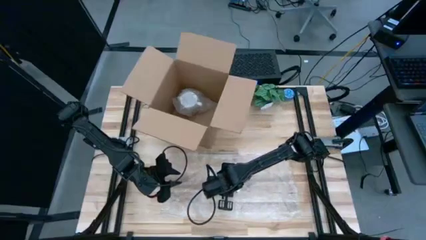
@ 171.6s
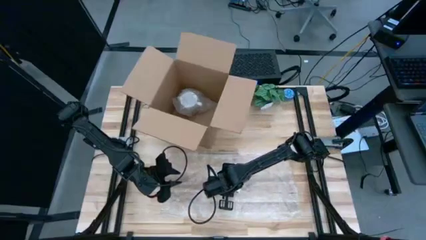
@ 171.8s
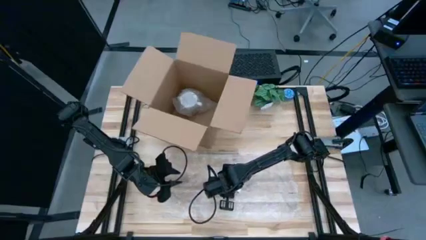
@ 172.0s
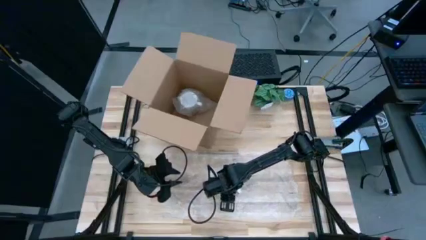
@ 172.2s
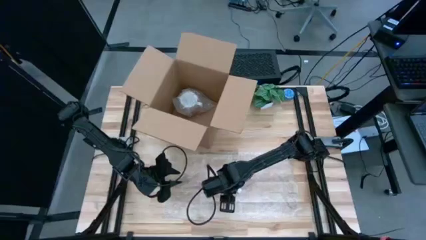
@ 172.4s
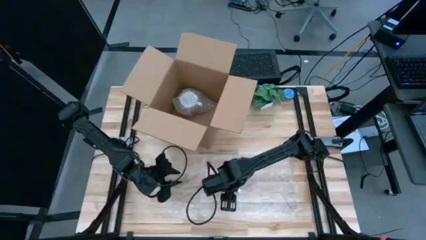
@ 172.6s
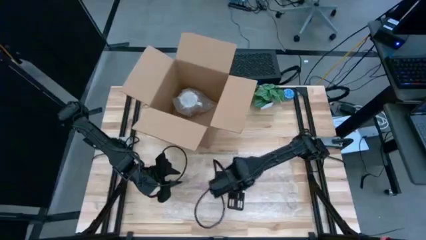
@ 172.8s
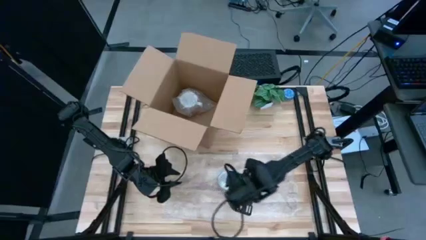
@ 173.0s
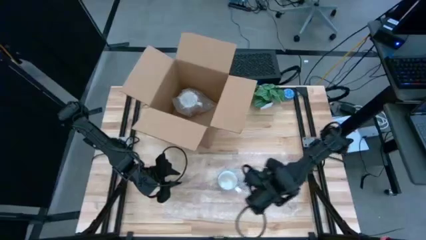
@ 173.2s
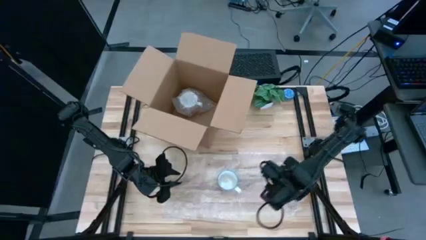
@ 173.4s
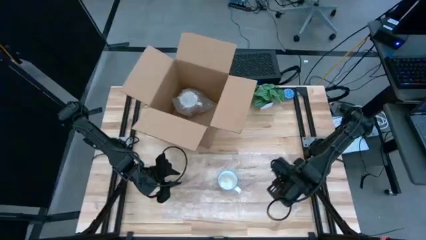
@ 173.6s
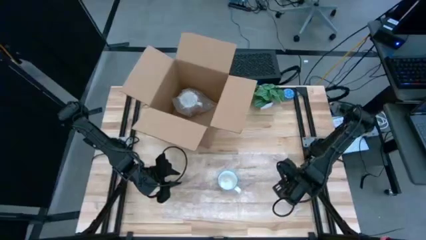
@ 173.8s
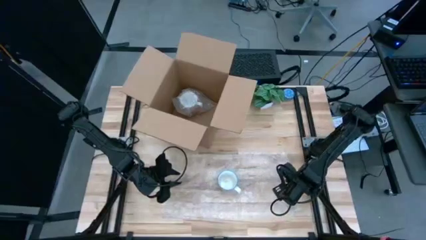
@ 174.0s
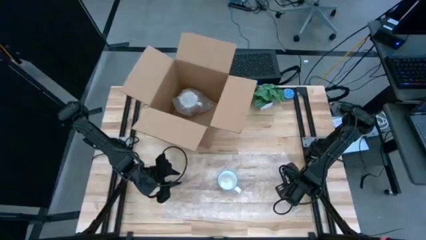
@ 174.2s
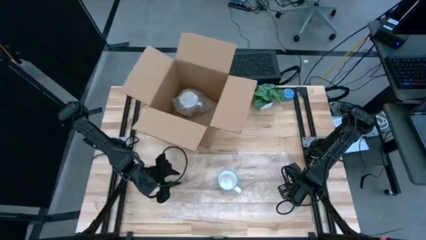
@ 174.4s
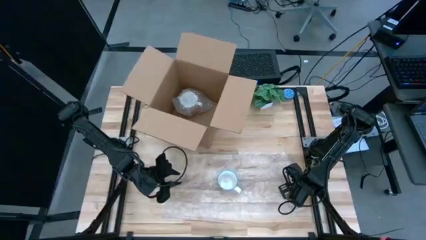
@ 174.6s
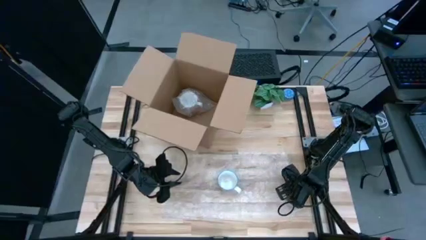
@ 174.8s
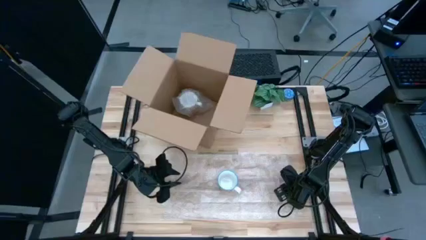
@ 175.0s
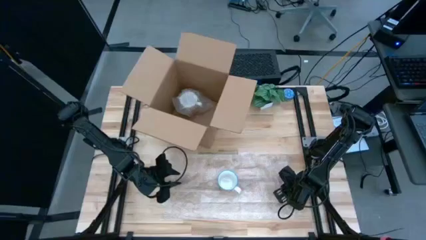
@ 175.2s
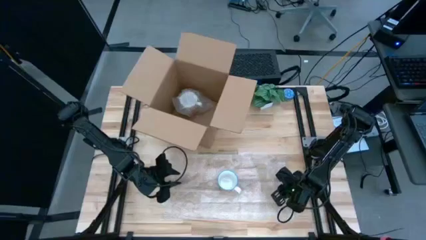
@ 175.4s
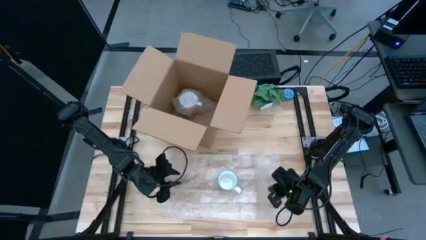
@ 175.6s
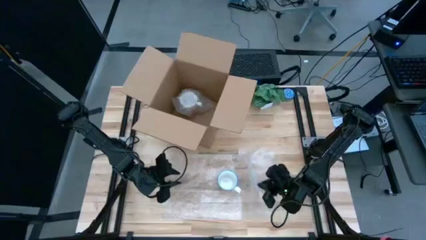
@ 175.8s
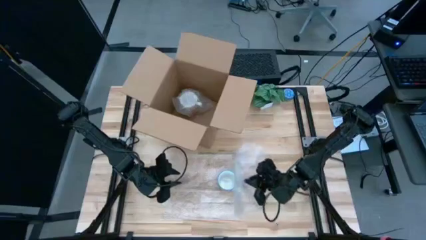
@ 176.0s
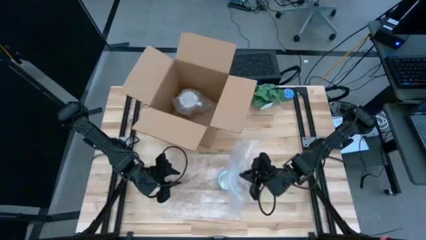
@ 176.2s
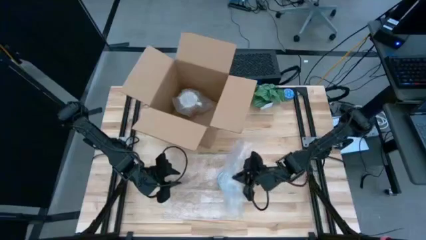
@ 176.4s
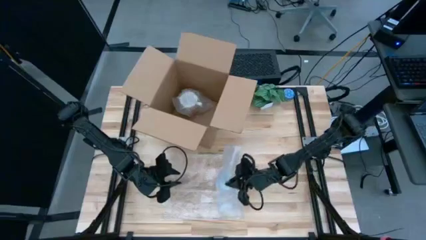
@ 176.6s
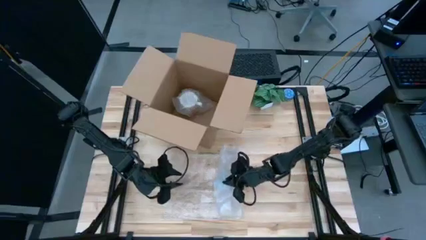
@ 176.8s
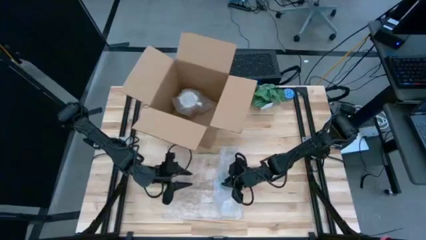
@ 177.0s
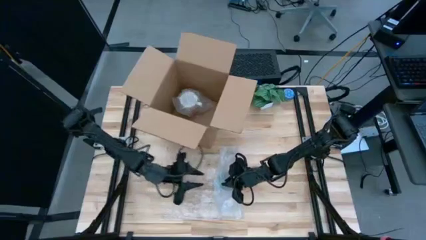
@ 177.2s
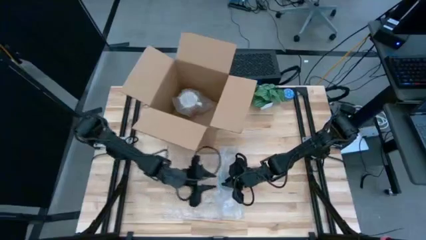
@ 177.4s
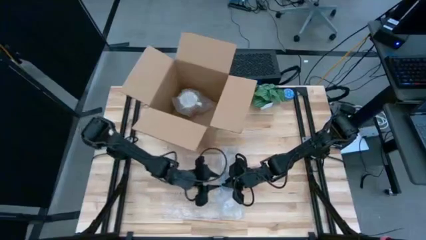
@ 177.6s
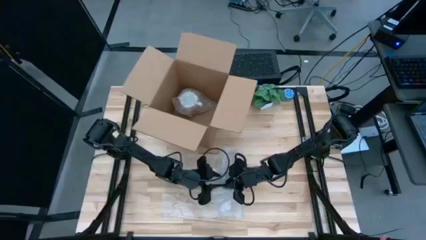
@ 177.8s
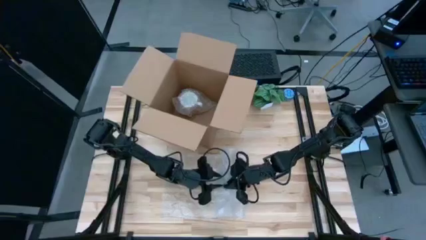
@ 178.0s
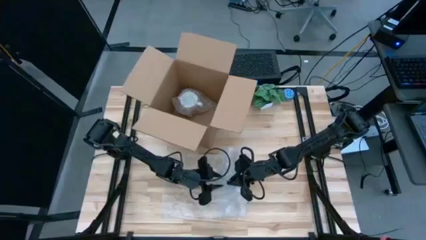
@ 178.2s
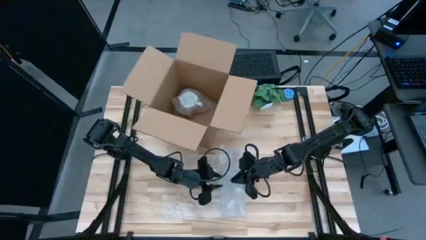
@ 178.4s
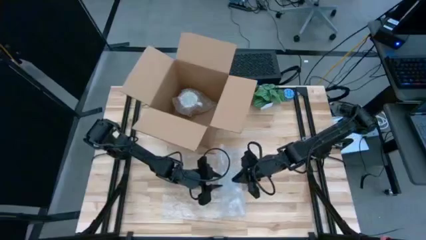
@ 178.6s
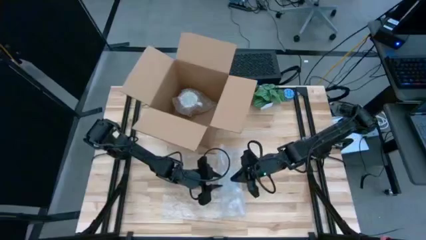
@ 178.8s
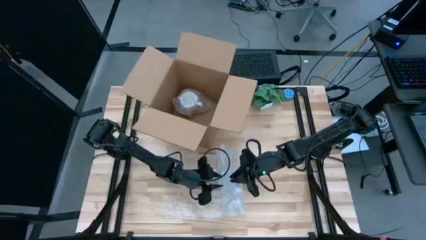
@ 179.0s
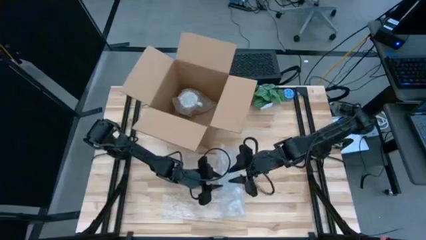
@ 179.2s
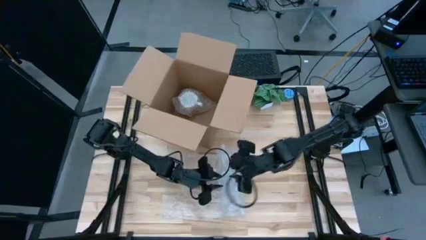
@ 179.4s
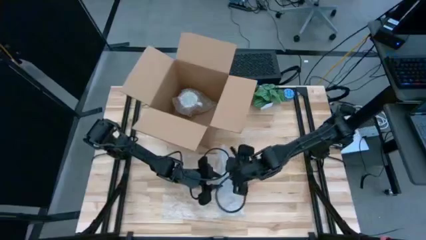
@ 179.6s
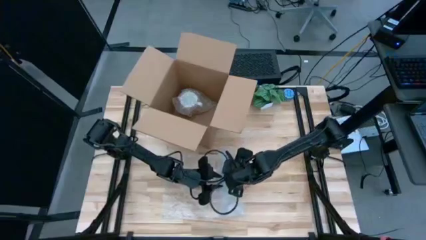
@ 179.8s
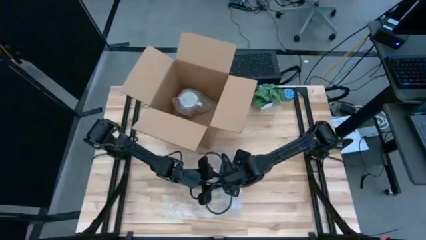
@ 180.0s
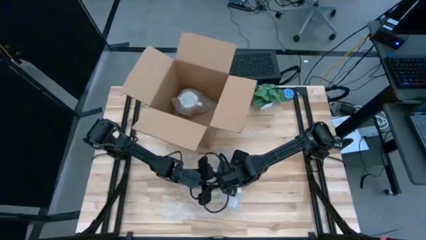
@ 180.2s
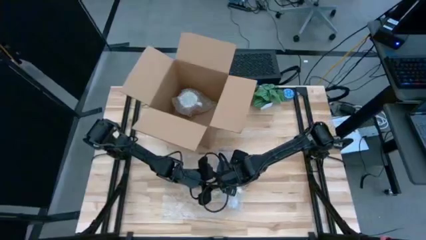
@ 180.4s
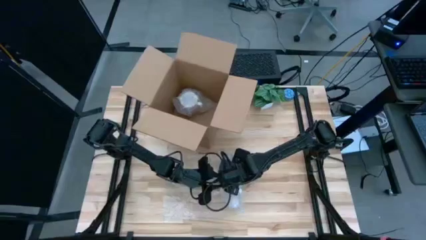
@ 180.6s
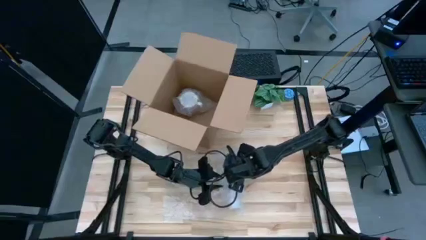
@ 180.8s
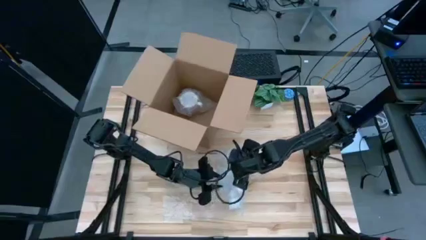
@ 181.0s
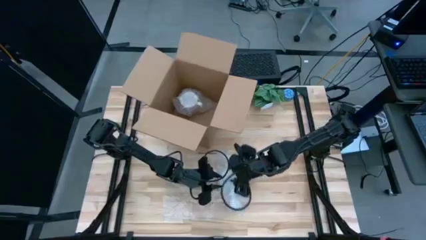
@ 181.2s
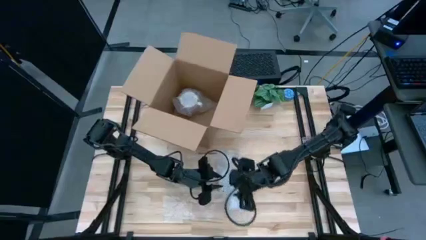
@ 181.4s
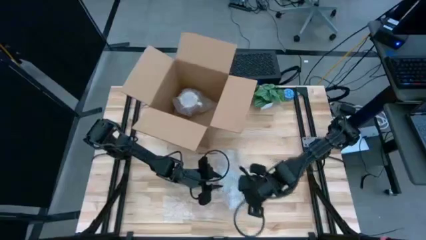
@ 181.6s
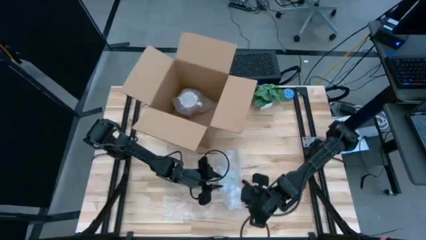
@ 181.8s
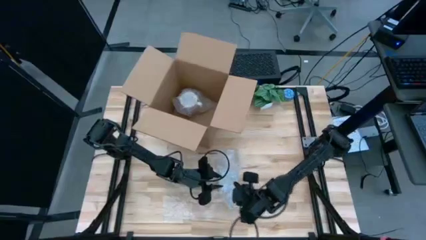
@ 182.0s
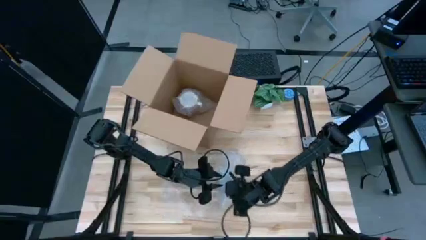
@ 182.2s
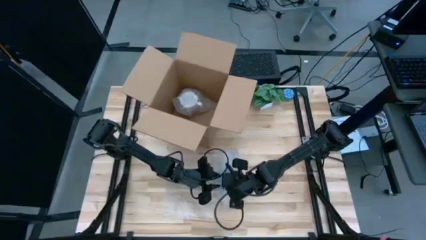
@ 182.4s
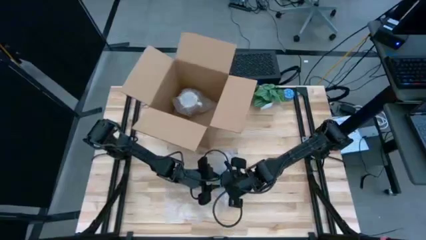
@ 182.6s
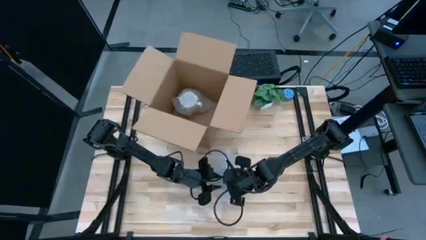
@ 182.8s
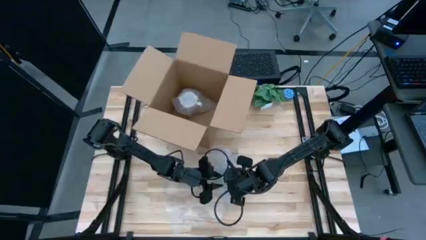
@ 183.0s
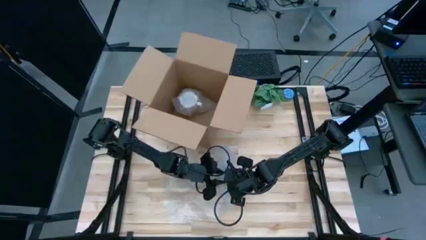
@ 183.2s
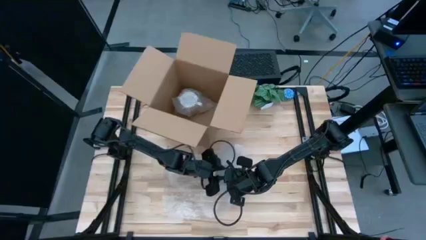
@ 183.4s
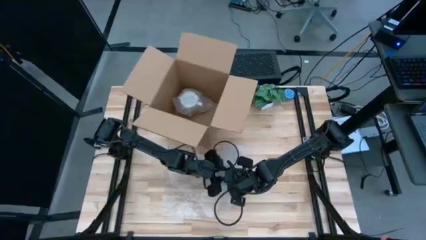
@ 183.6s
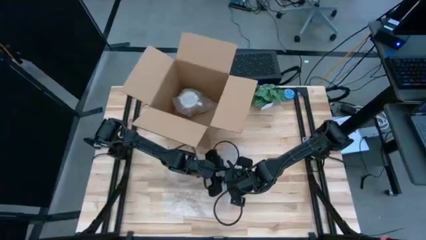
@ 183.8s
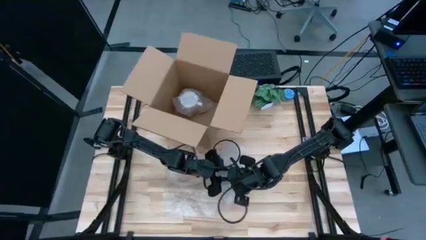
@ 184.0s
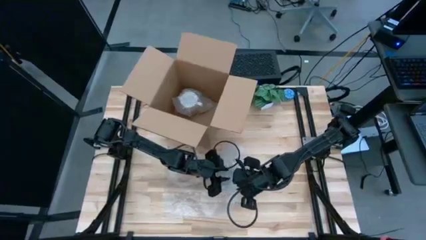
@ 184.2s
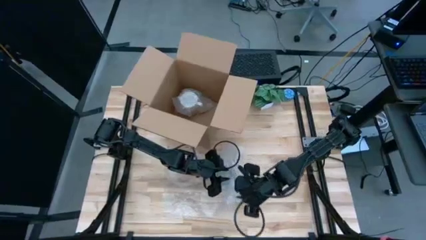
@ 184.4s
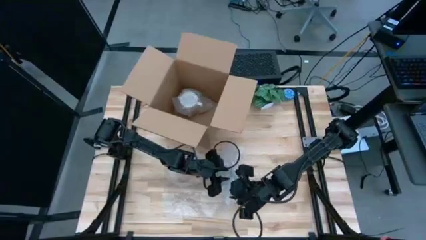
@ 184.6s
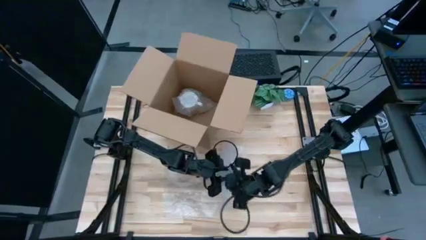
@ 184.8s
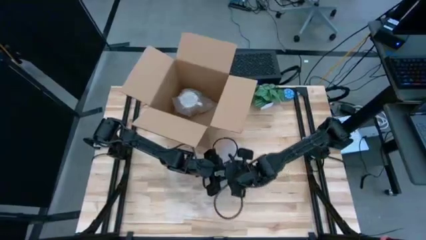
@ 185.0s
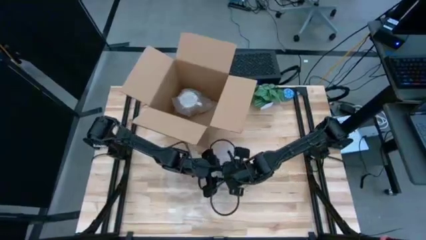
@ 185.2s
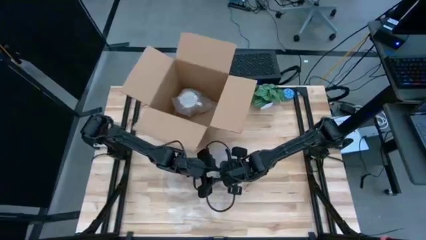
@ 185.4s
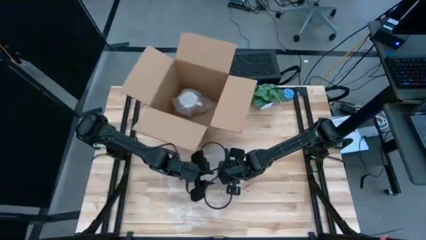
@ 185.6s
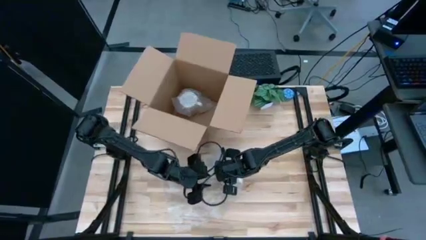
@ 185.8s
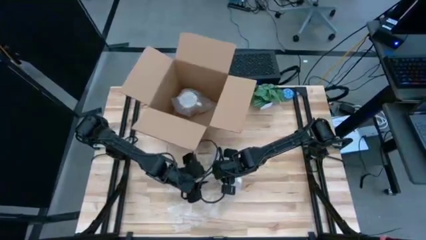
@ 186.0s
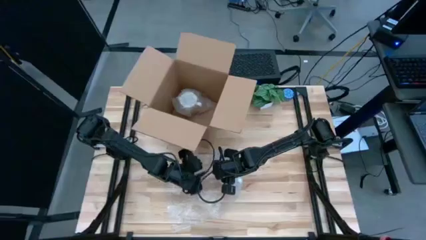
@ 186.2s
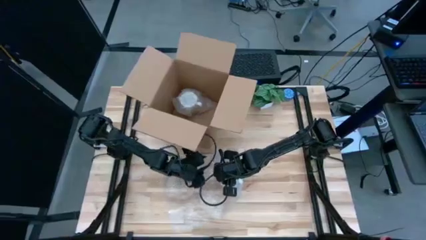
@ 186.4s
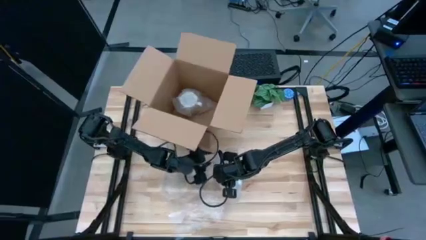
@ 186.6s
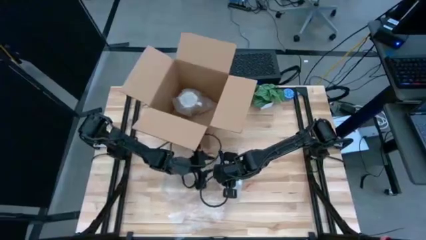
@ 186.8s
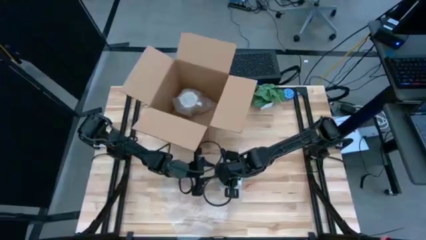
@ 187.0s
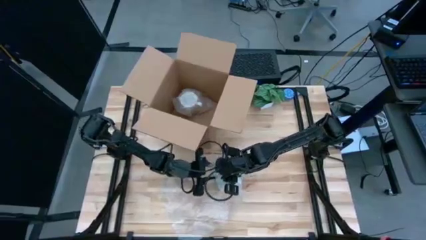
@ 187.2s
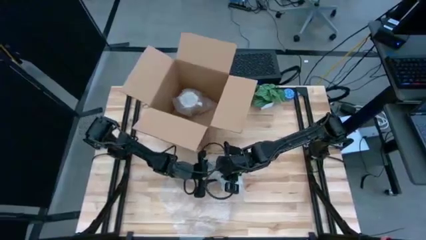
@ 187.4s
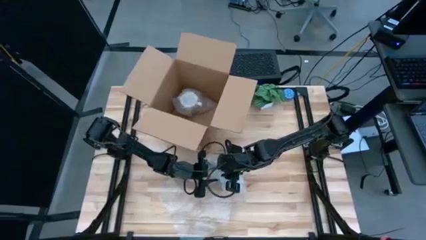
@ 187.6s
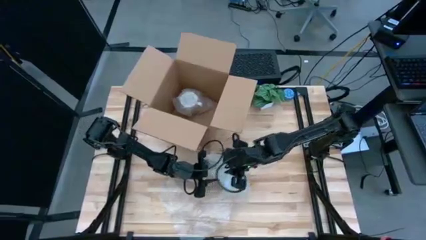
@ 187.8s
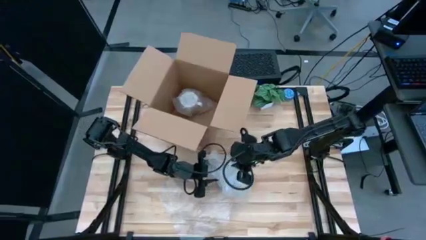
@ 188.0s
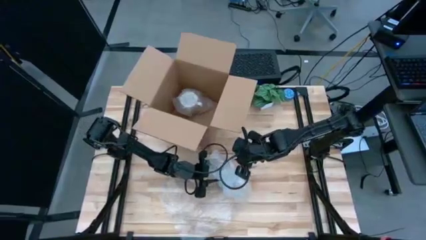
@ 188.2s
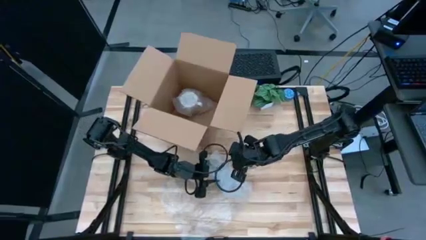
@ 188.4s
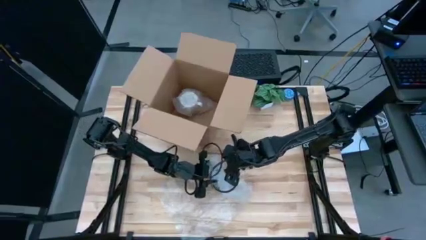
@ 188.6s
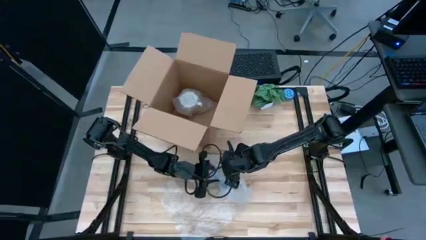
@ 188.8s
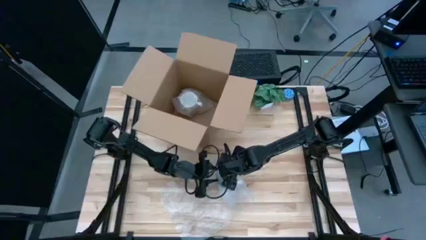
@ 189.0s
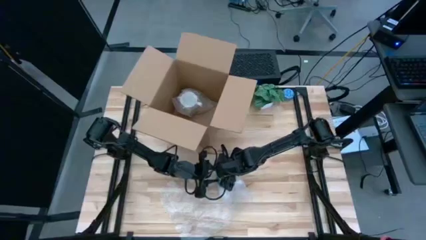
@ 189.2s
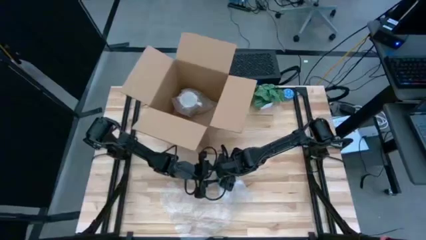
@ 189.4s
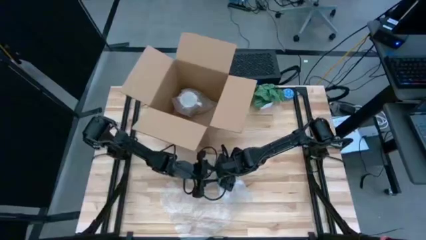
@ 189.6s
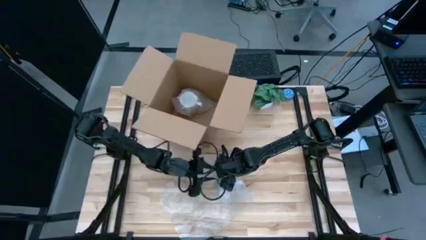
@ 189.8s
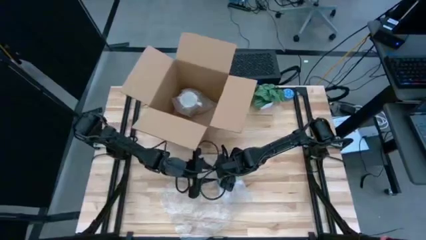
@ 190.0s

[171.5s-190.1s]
Task: wrap mug
Wrap the red mug with bubble wrap
